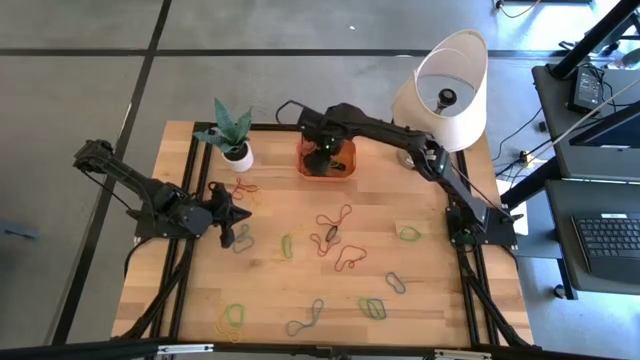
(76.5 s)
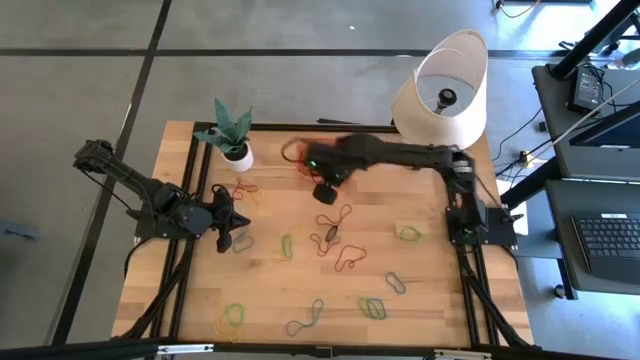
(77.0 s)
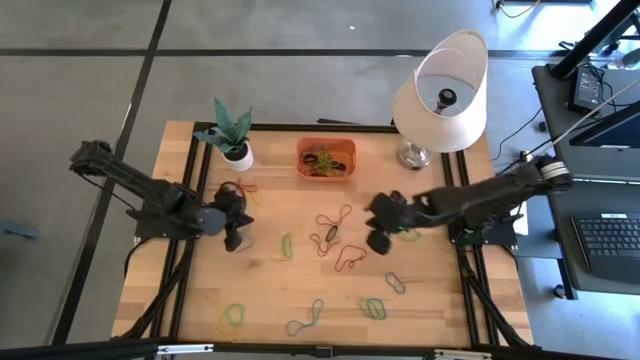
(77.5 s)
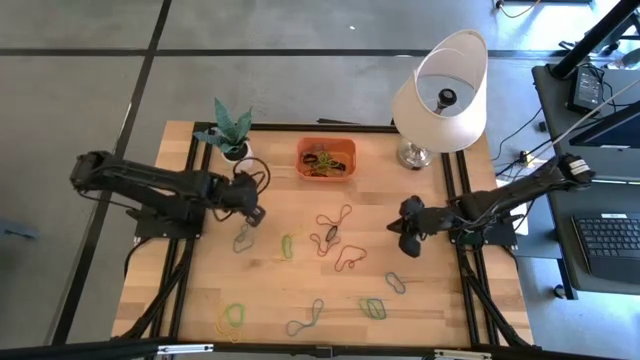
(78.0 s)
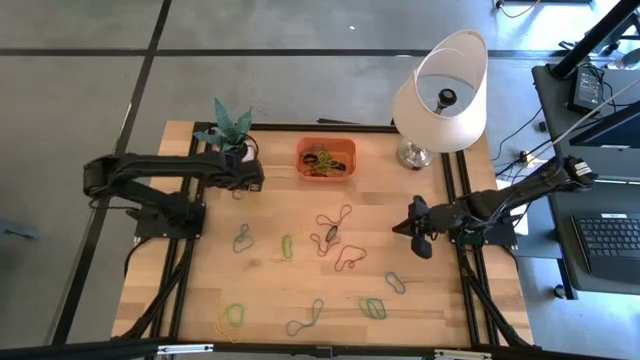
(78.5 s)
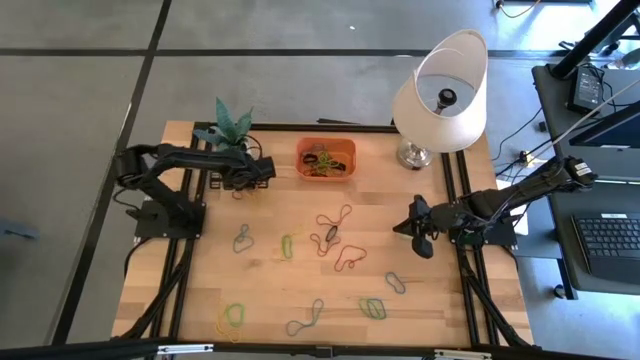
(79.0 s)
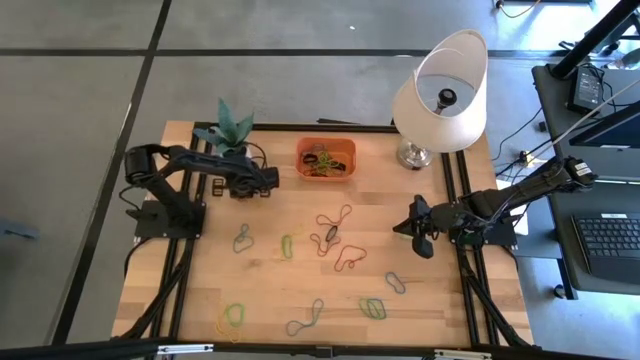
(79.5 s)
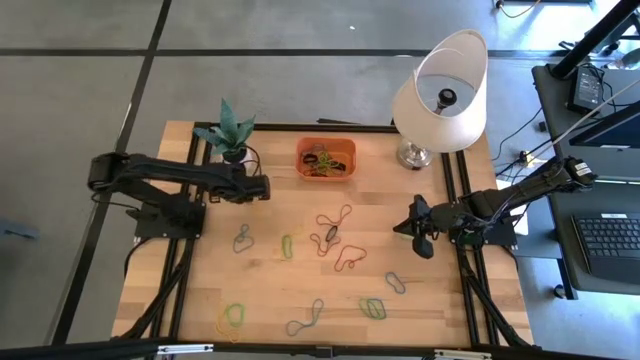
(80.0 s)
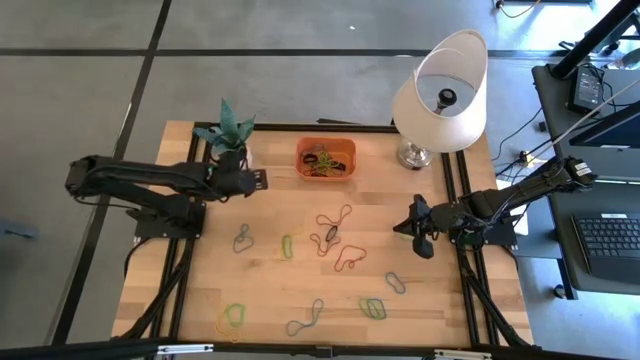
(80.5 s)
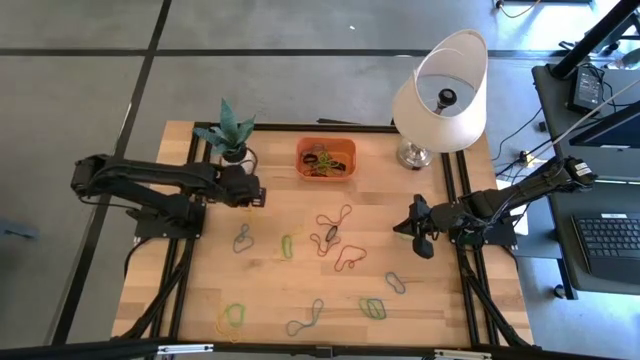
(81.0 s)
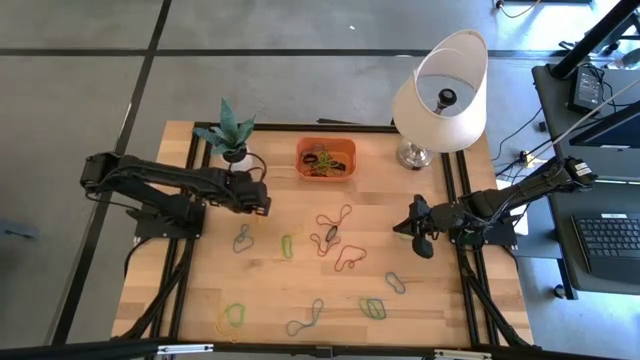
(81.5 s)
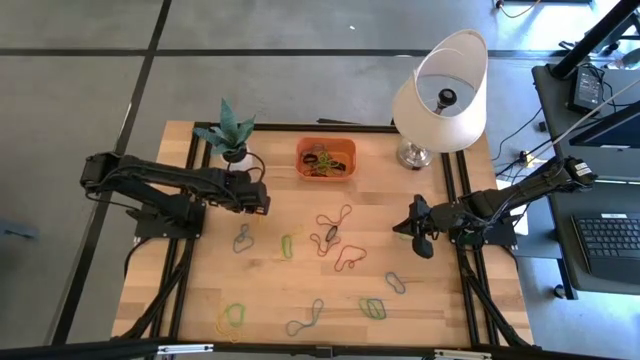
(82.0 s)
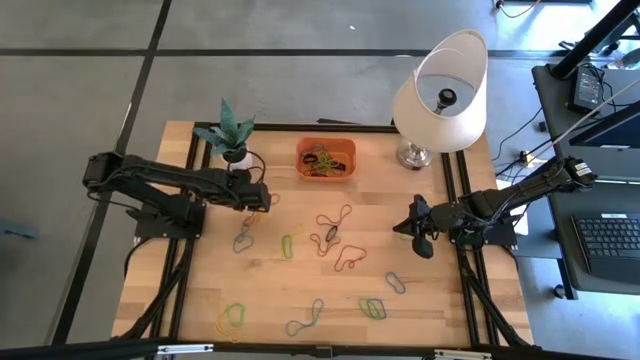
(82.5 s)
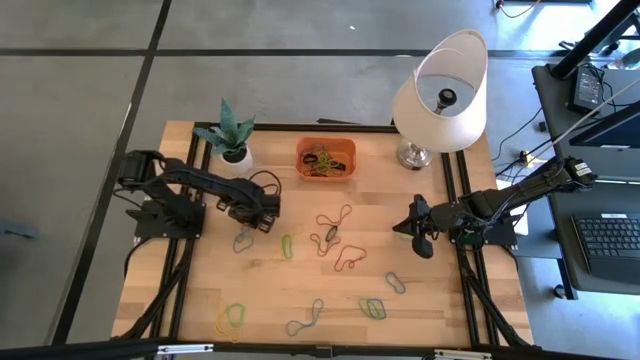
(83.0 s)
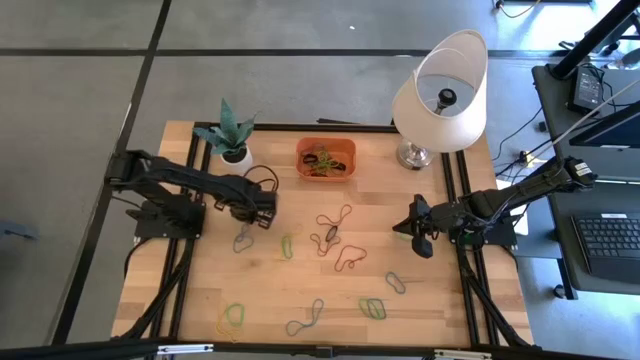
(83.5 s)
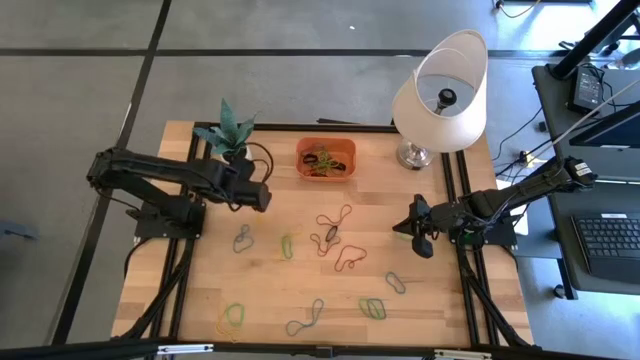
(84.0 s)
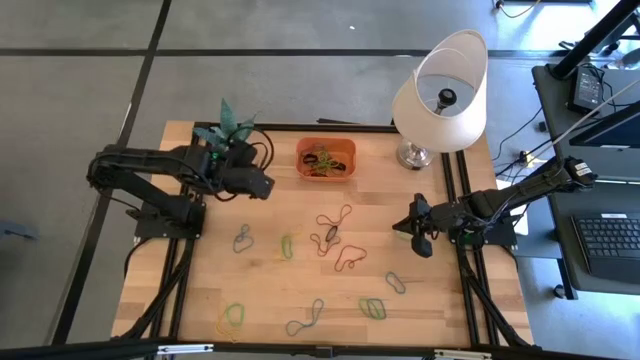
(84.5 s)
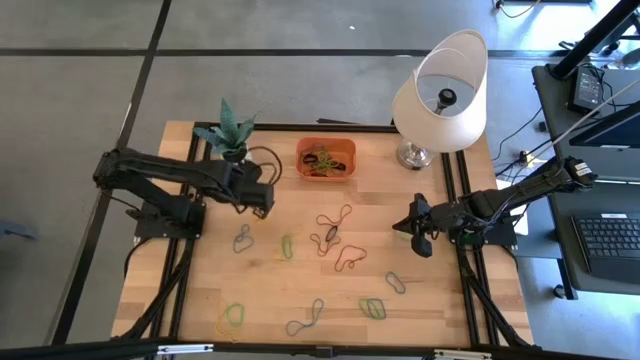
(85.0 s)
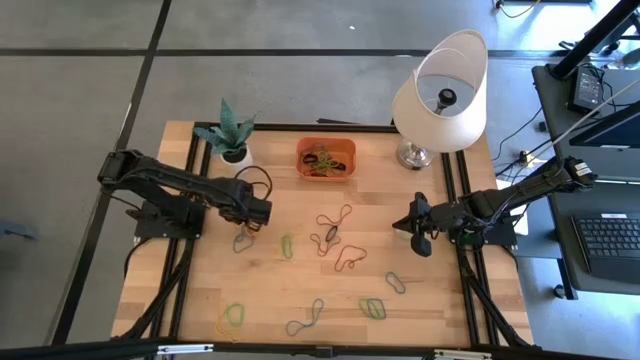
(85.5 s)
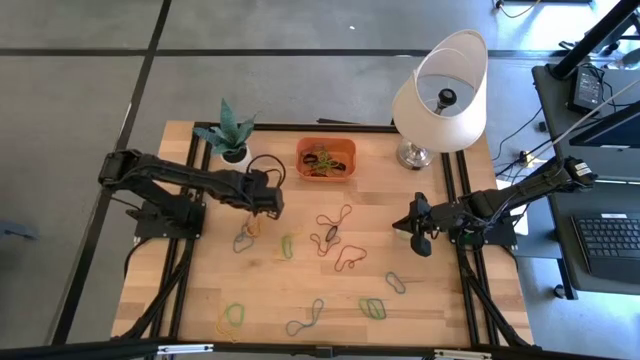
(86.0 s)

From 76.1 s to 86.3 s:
Task: Pick and place rubber bands into bin
Put the blue rubber band into the orange bin

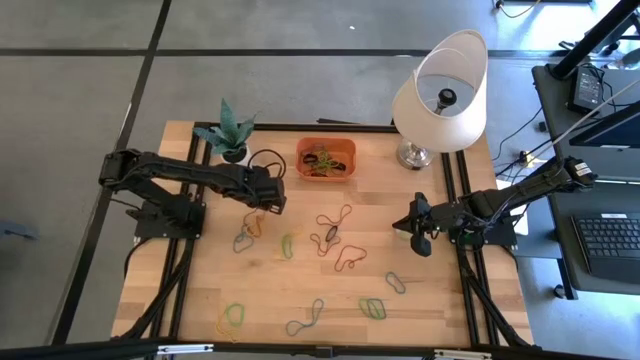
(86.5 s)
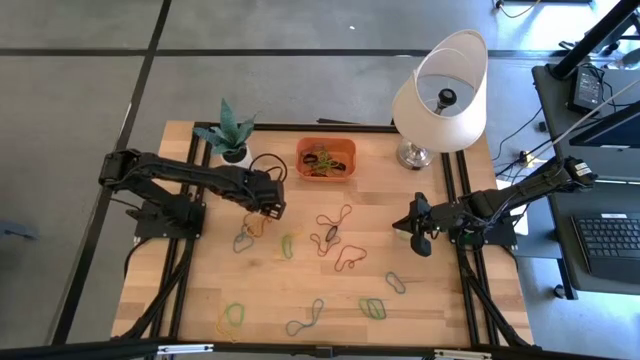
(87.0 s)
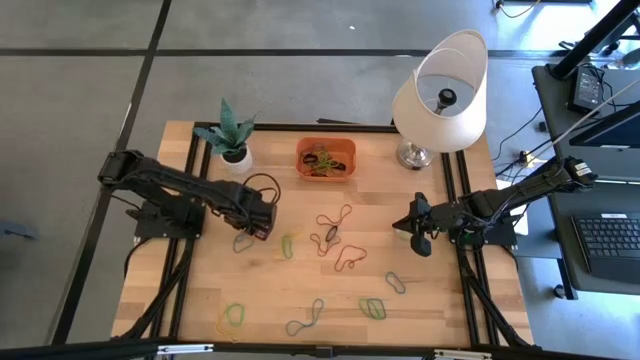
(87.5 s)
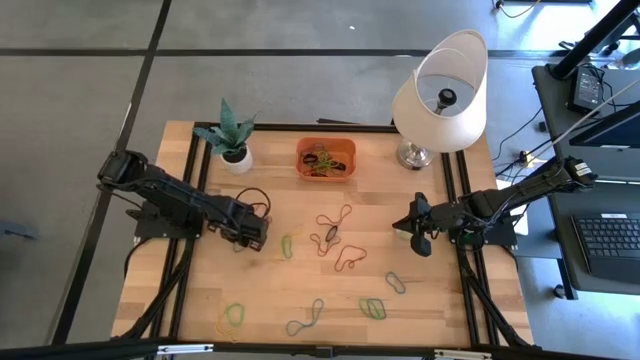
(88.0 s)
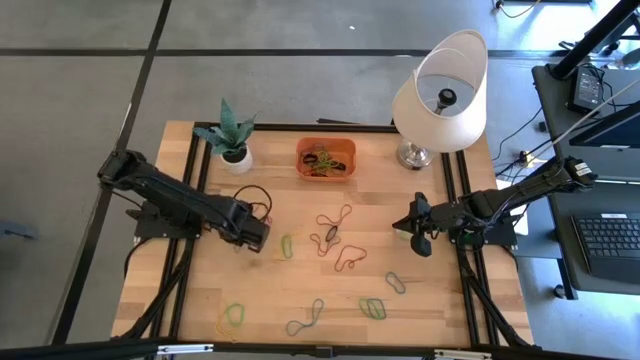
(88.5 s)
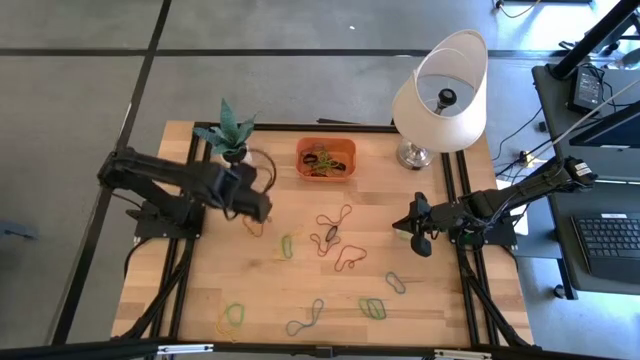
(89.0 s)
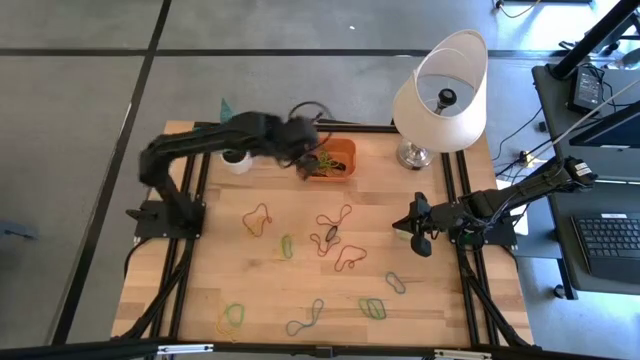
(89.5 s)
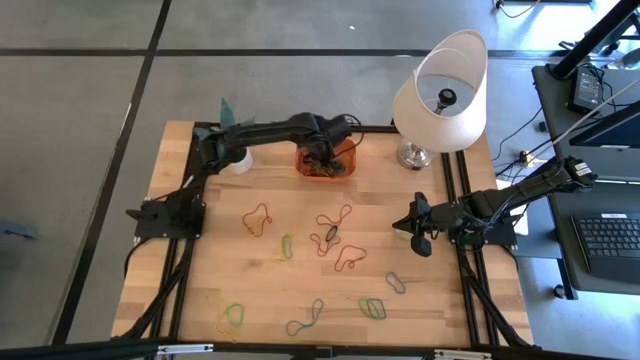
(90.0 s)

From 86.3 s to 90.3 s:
Put the blue rubber band into the orange bin

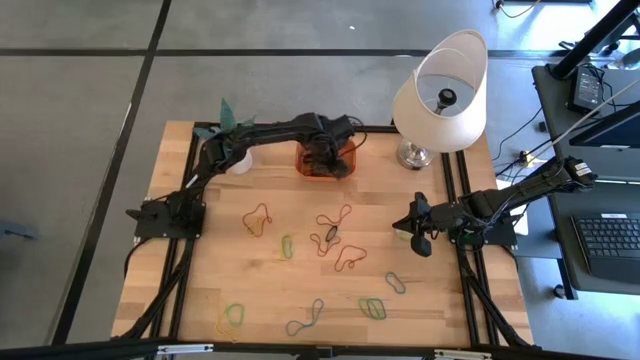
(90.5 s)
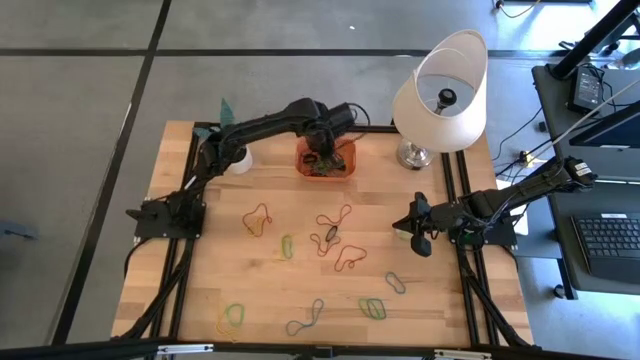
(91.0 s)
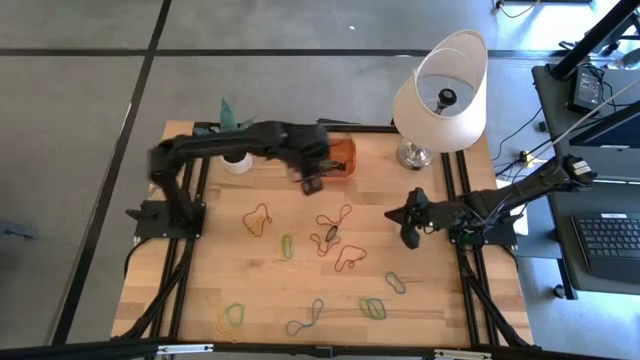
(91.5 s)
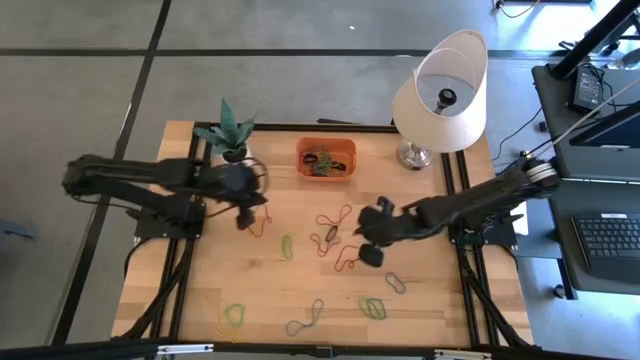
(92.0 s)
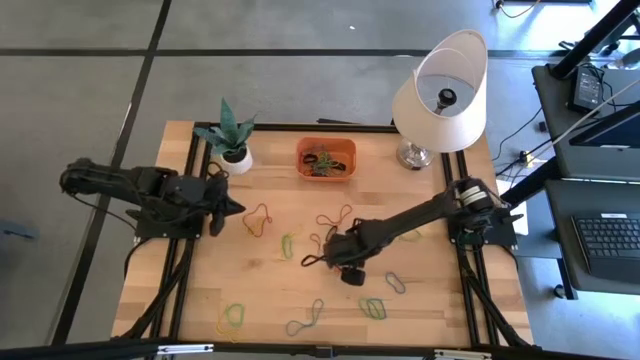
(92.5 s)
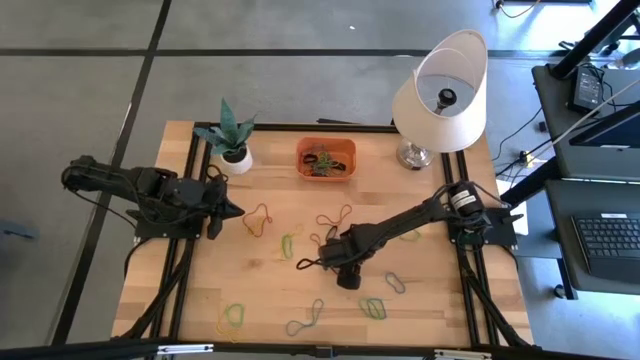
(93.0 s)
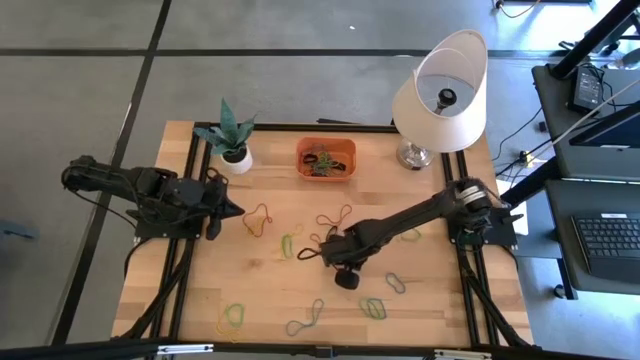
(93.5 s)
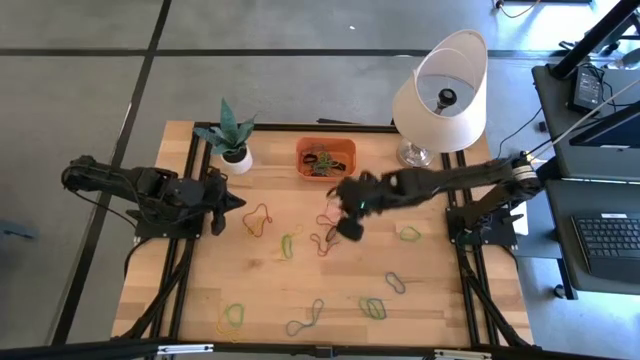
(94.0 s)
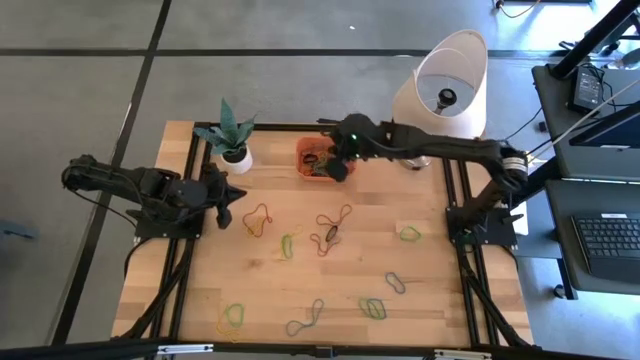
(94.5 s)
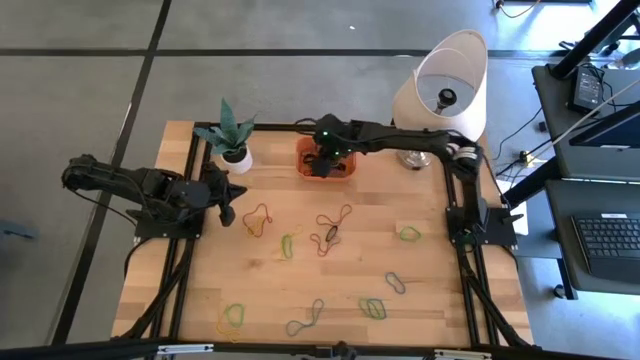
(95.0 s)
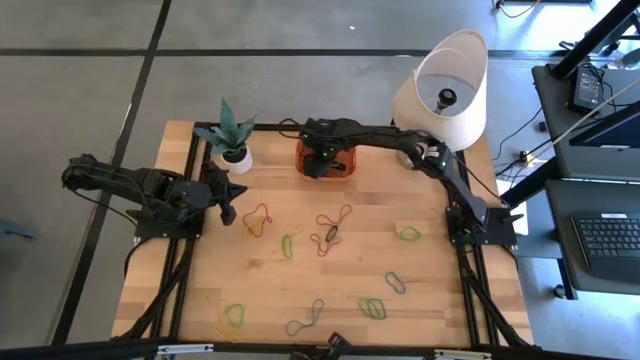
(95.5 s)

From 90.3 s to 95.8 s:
Put the red rubber band into the orange bin

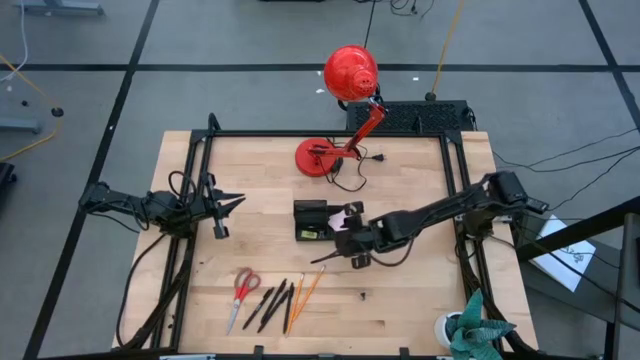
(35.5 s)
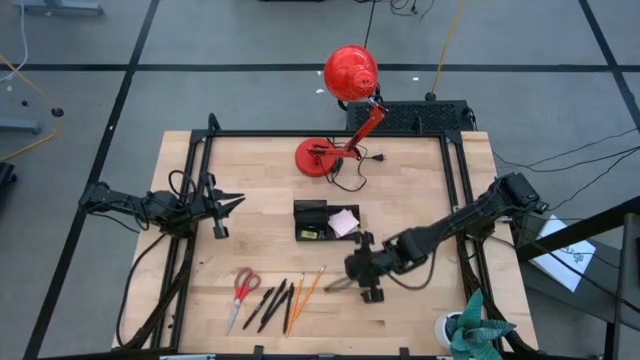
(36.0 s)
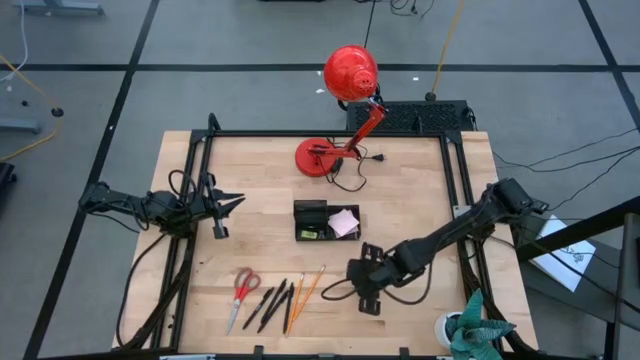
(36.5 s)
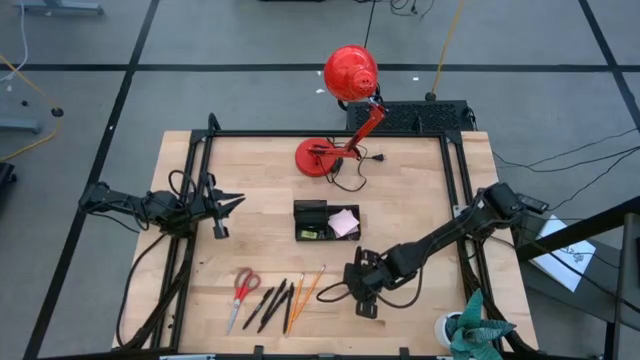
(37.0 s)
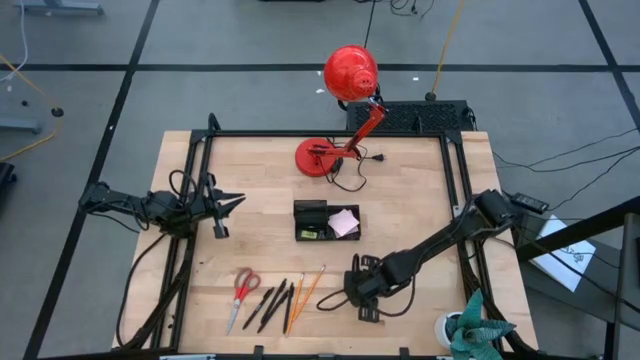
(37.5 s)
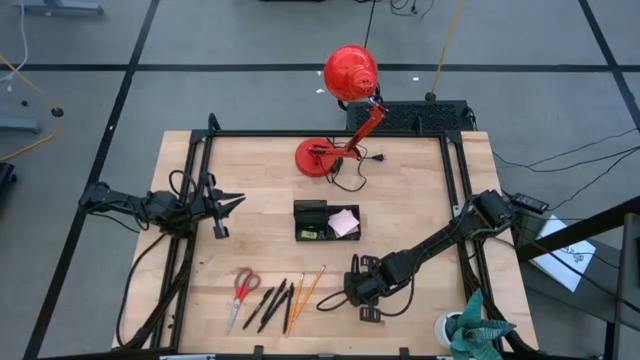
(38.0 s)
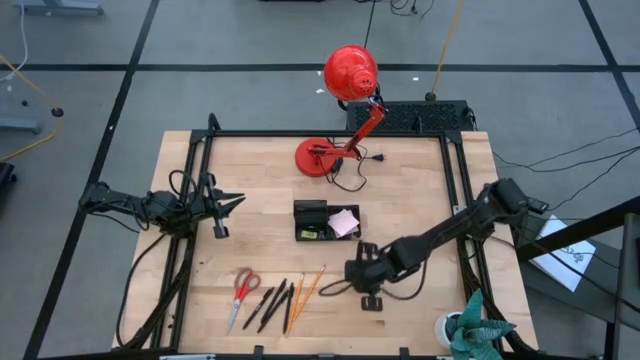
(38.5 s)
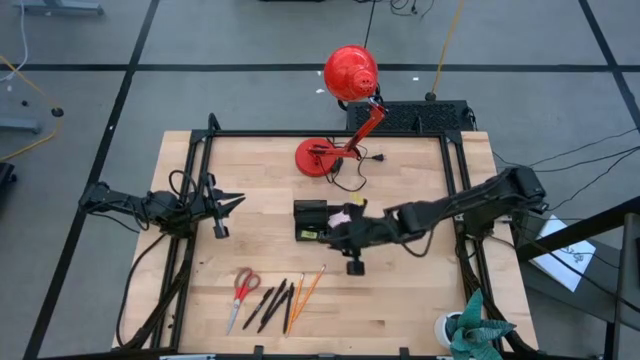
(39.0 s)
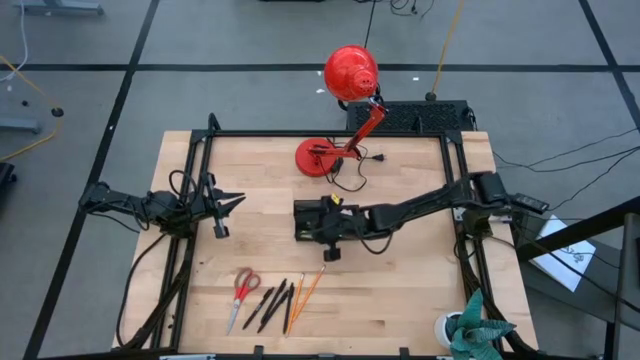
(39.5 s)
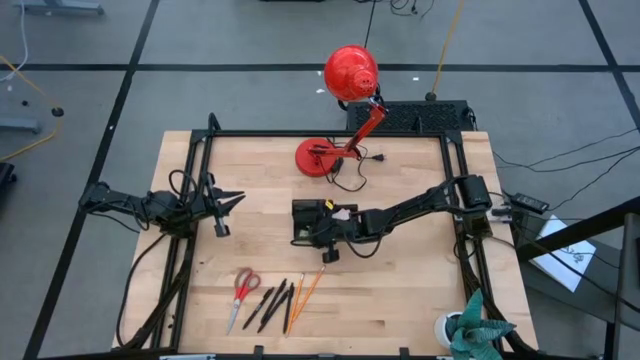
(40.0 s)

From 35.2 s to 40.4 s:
Task: Pick and place office supplies into organizer
Put the black binder clip into the desk organizer
